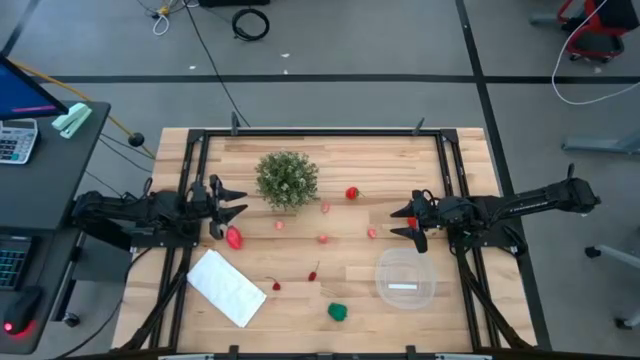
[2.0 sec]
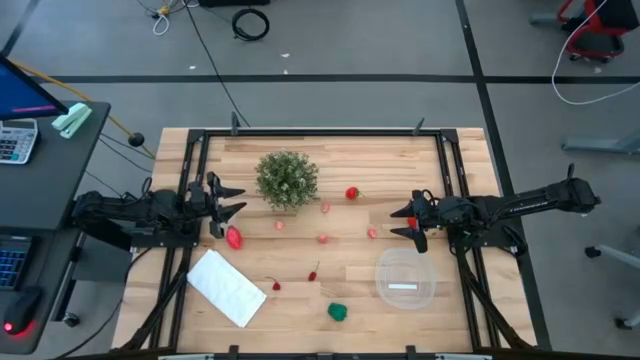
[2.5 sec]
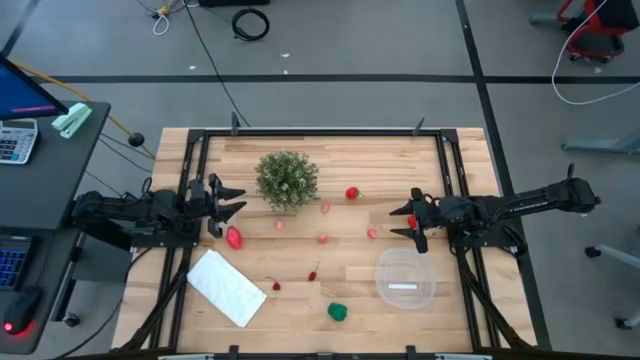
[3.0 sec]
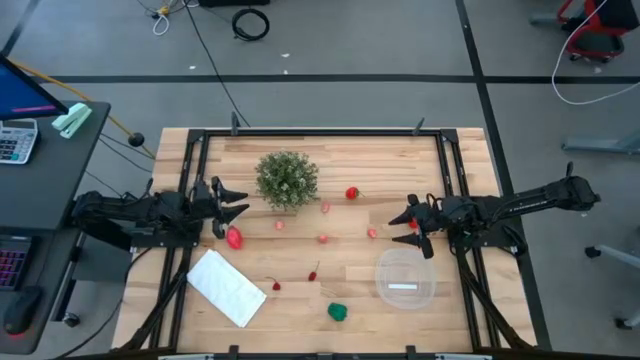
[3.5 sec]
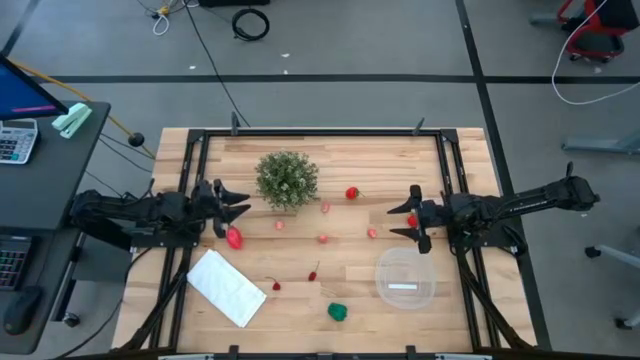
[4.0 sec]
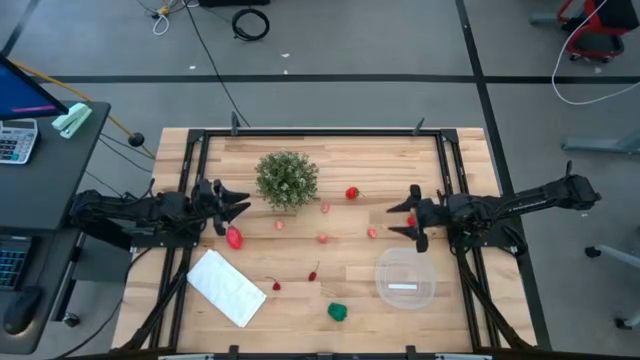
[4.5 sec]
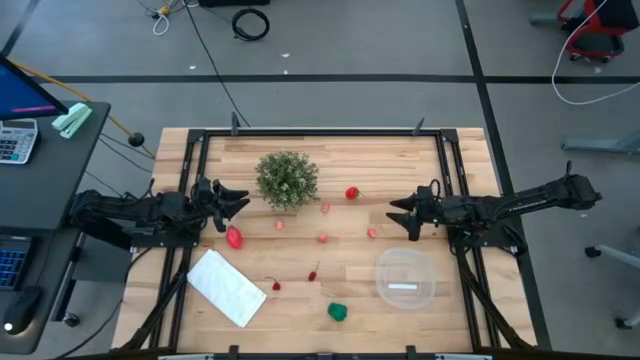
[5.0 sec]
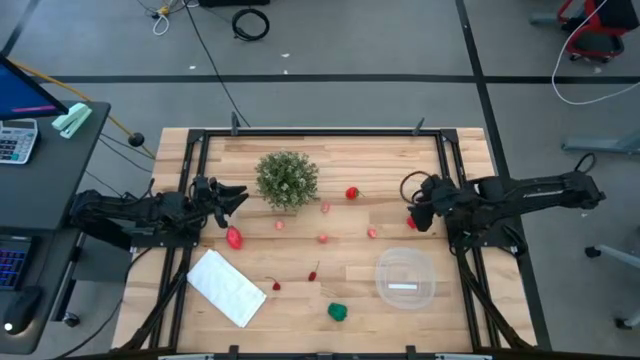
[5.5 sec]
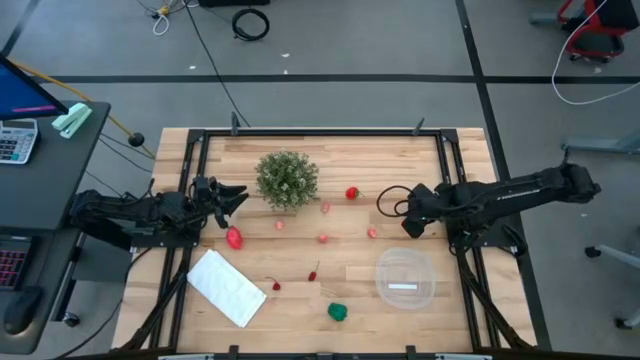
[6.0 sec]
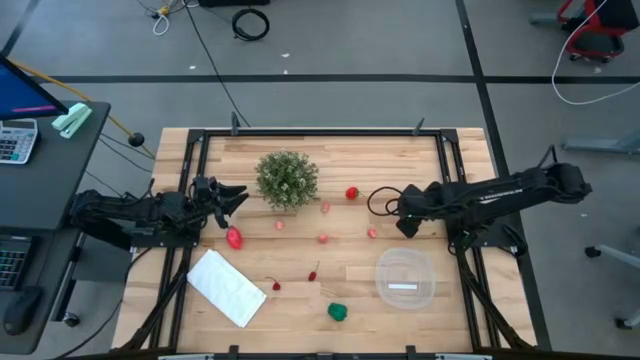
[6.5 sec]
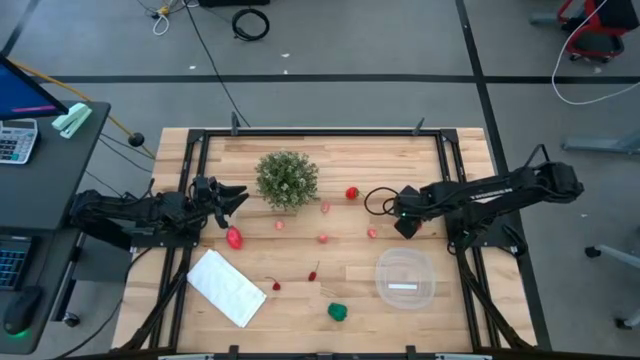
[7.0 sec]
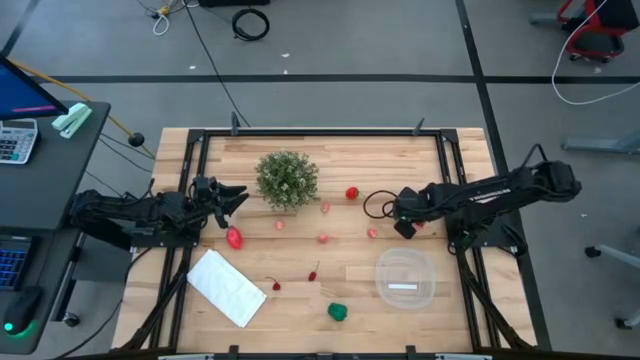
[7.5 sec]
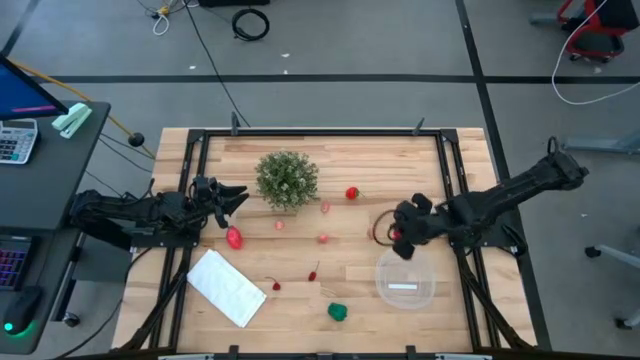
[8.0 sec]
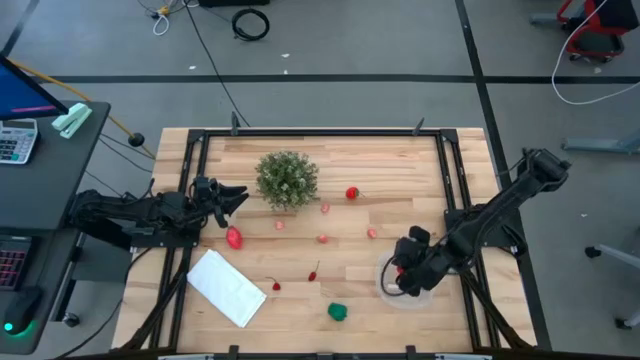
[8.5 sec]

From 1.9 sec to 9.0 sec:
Task: Pick and placing Produce into tupperware
Put the bottom strawberry into the transparent container

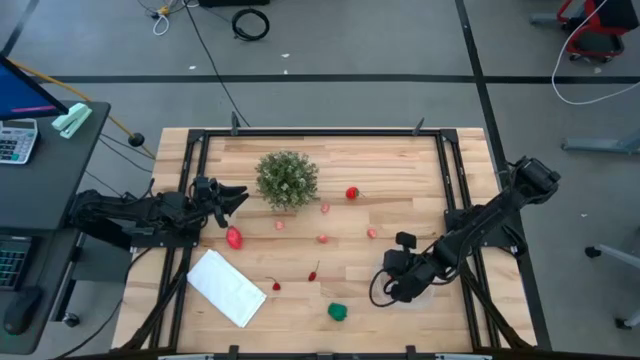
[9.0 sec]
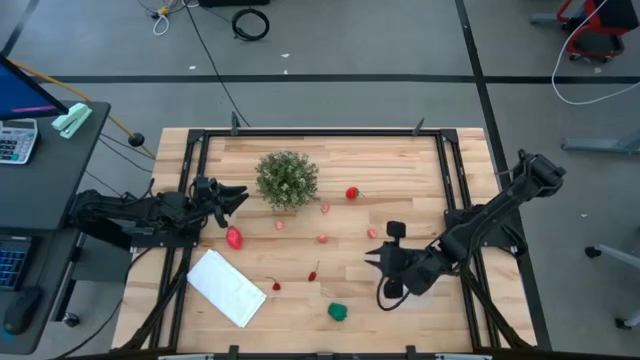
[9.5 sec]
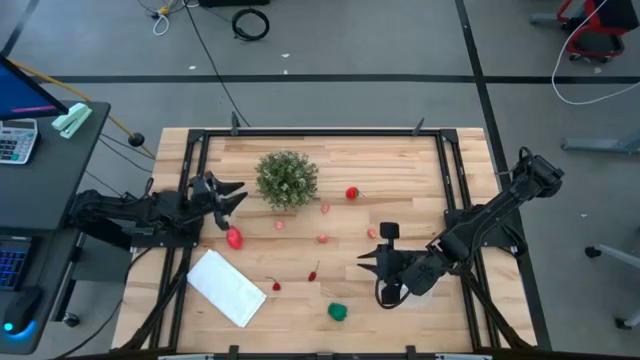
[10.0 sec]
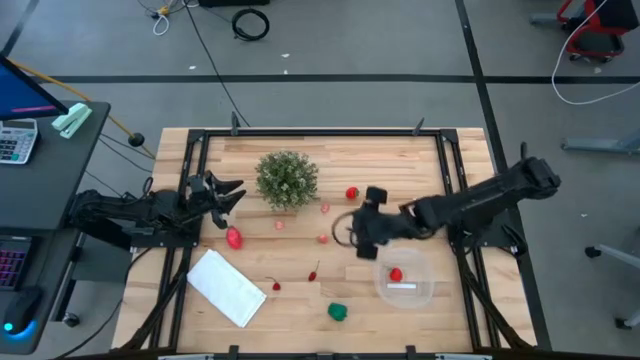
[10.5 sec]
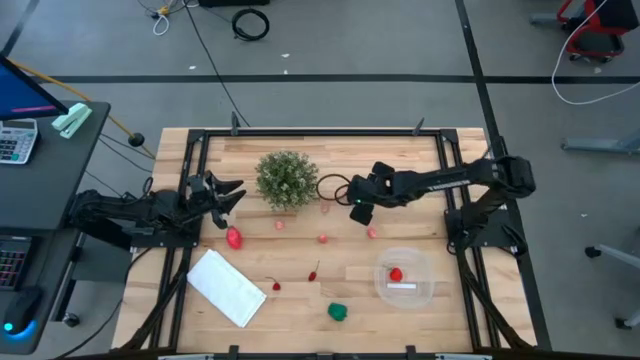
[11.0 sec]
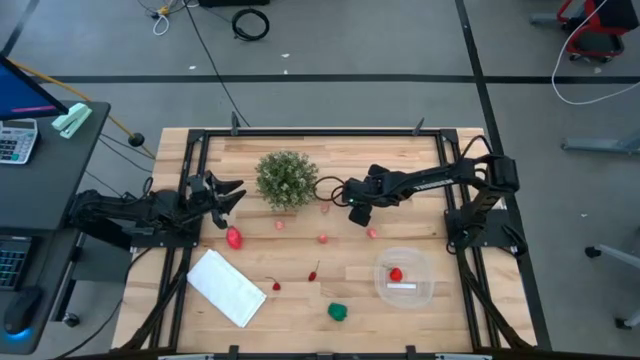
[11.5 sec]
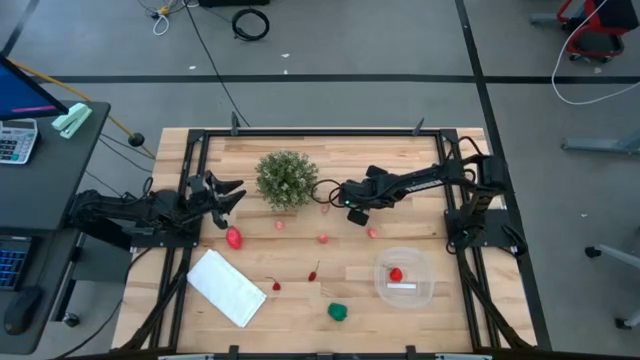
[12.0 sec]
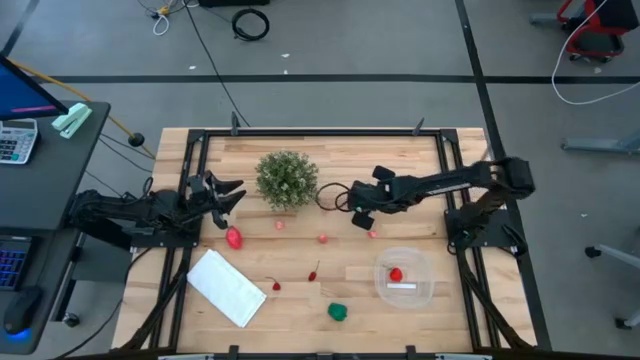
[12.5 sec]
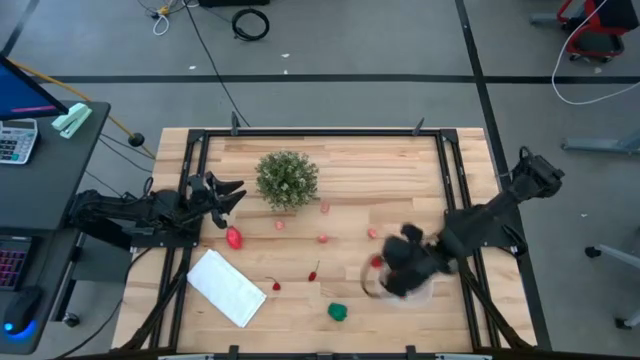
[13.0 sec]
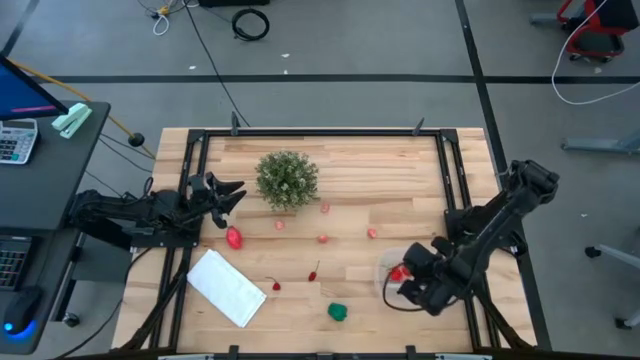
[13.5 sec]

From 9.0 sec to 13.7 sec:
Put the strawberry into the transparent container

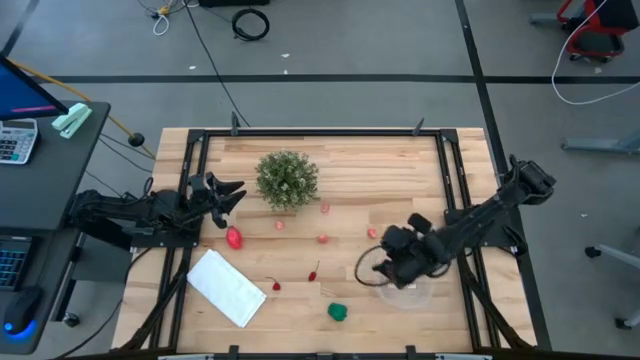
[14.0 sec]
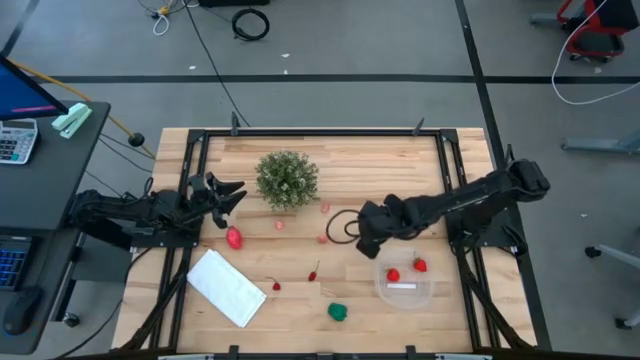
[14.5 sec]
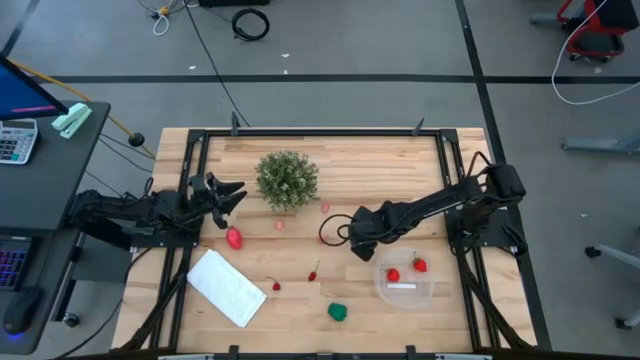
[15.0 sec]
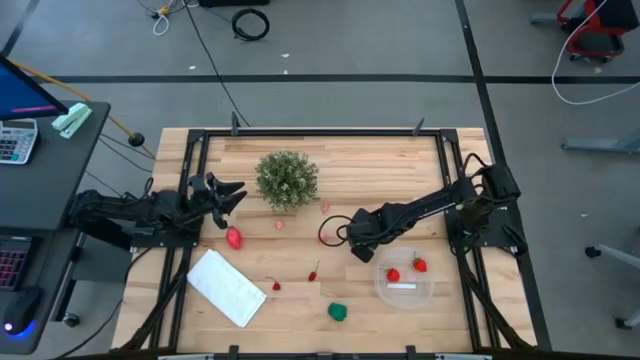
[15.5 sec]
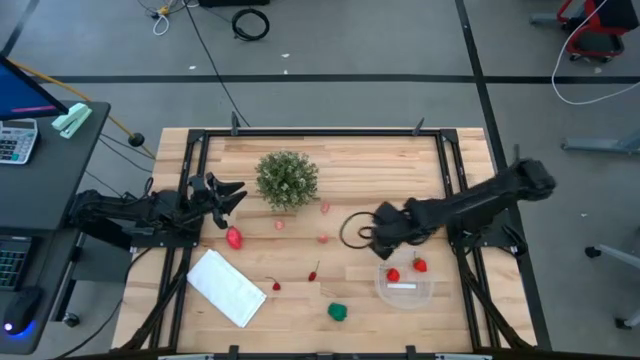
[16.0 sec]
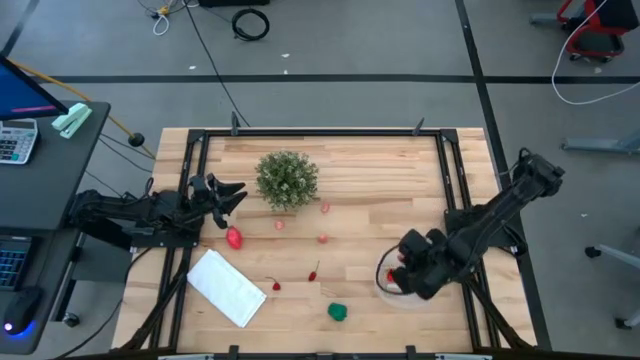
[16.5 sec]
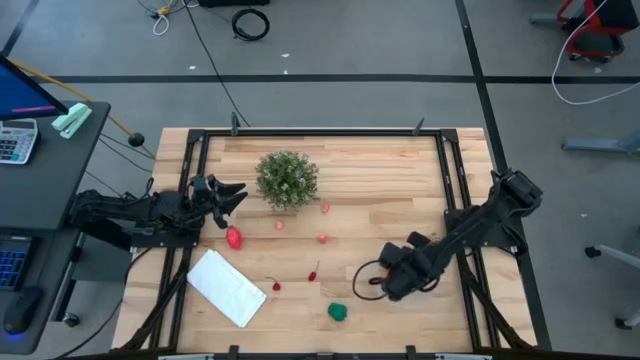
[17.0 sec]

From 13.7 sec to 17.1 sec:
Put the apricot into the transparent container

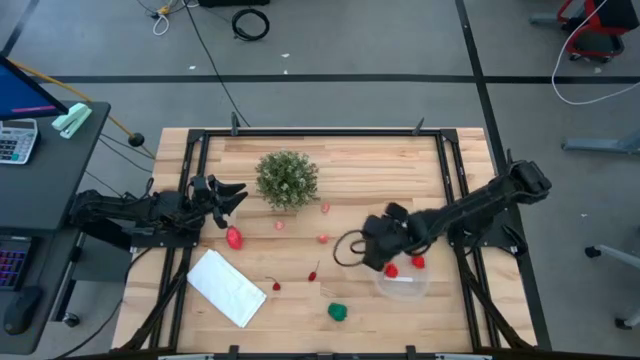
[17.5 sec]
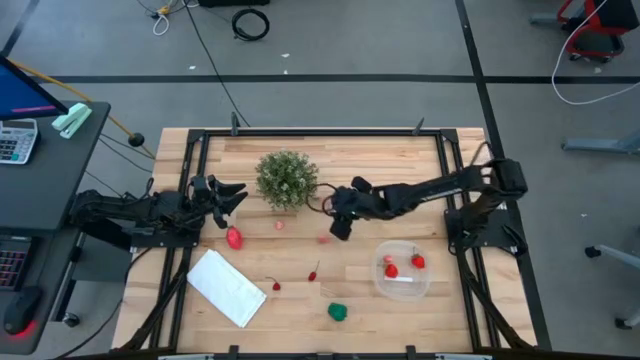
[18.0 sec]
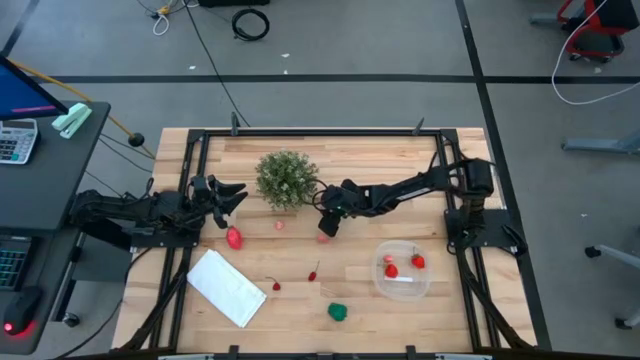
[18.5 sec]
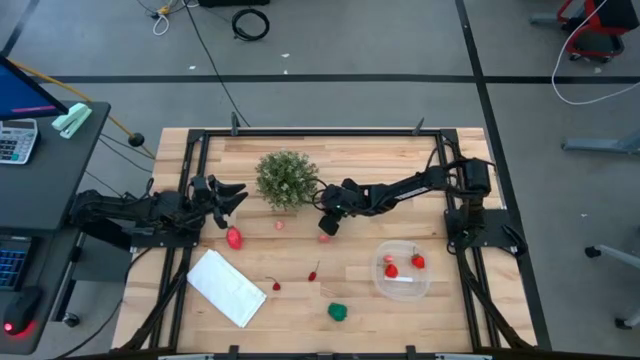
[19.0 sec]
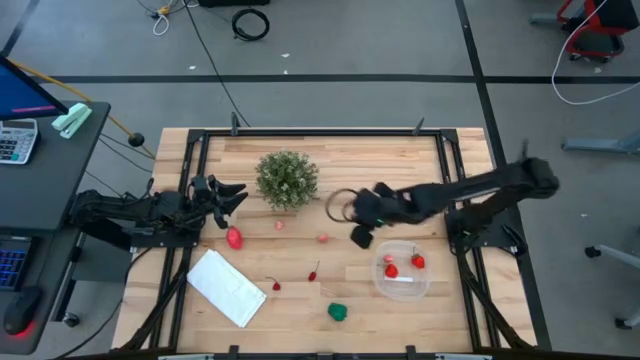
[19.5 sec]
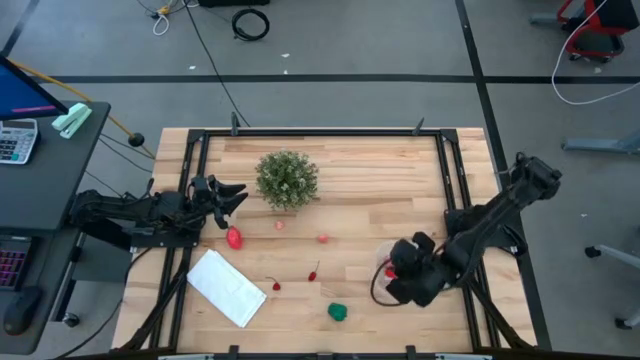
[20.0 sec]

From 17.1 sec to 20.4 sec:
Put the top apricot into the transparent container

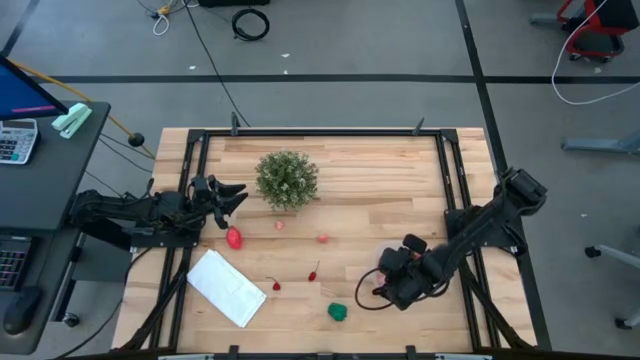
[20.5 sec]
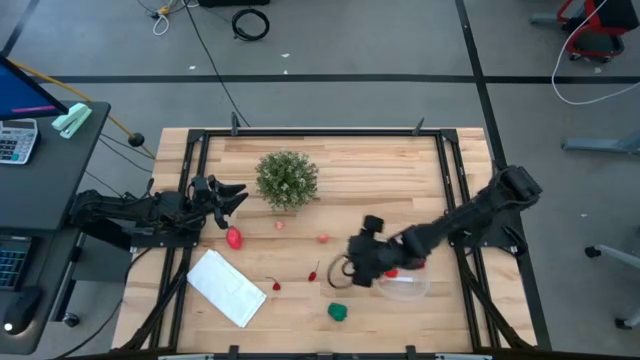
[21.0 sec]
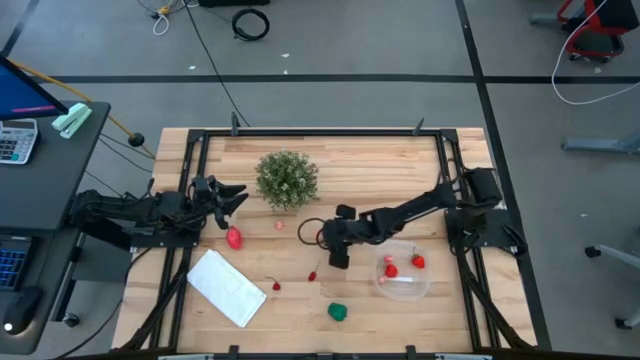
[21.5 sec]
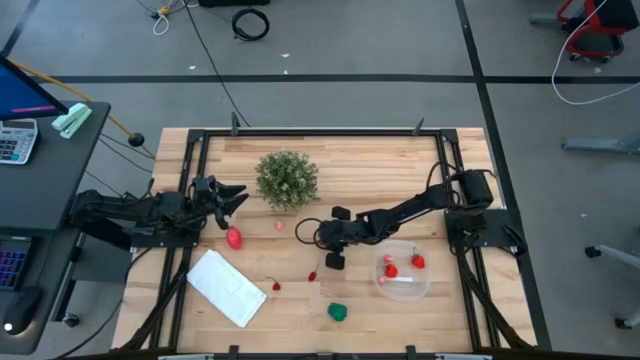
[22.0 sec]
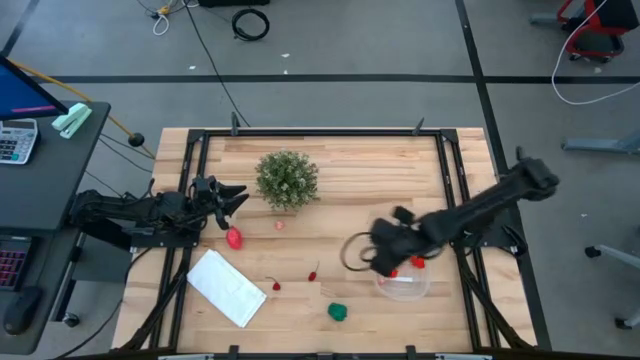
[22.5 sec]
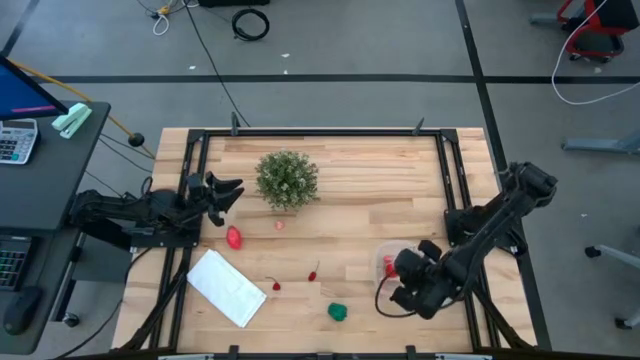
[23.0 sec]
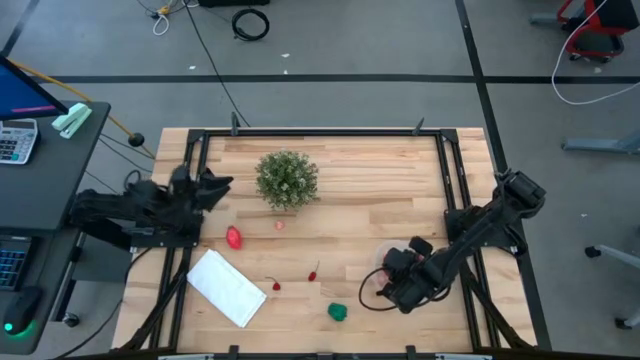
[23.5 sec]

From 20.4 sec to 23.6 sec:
Put the right apricot into the transparent container
